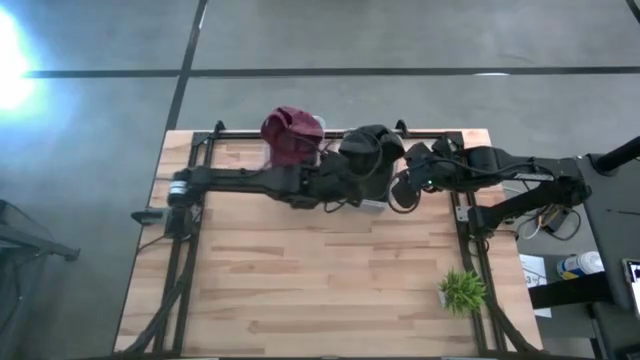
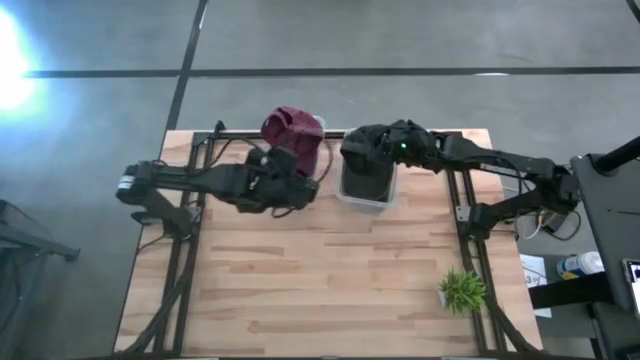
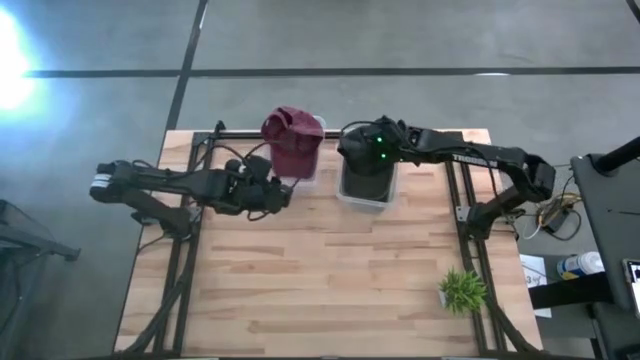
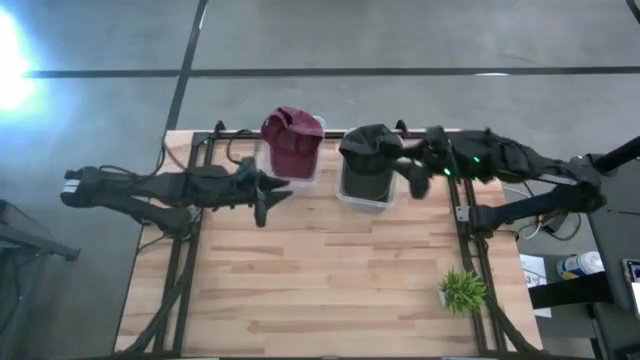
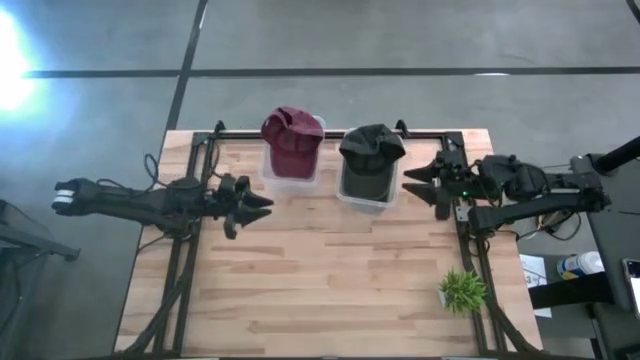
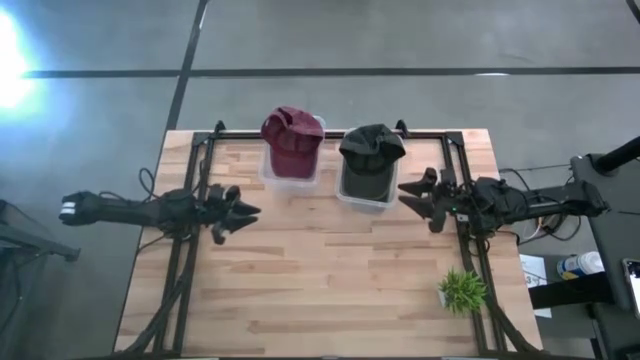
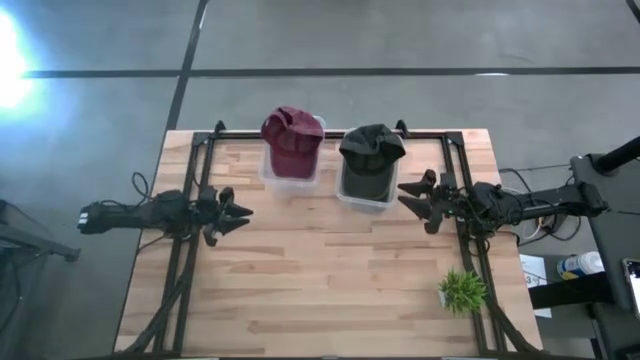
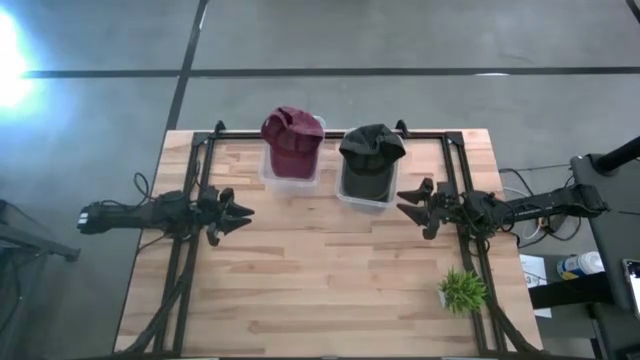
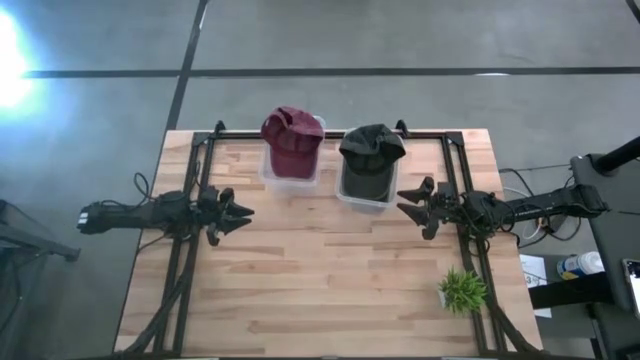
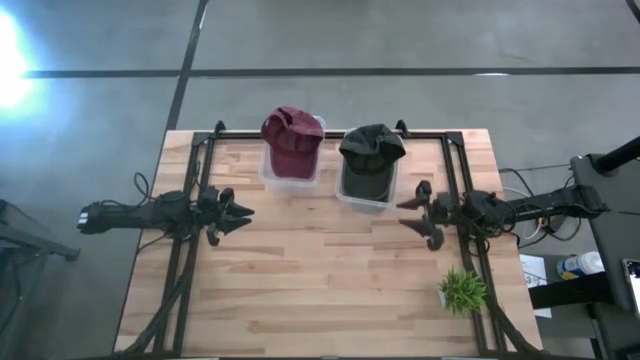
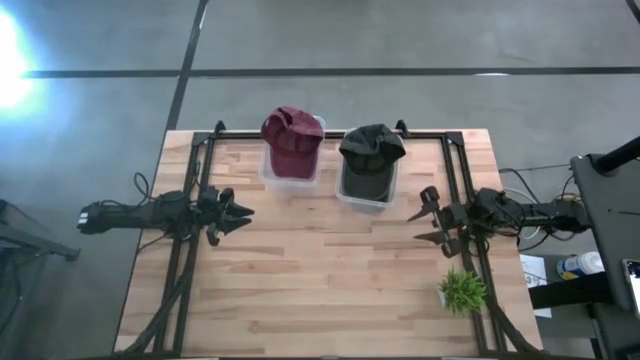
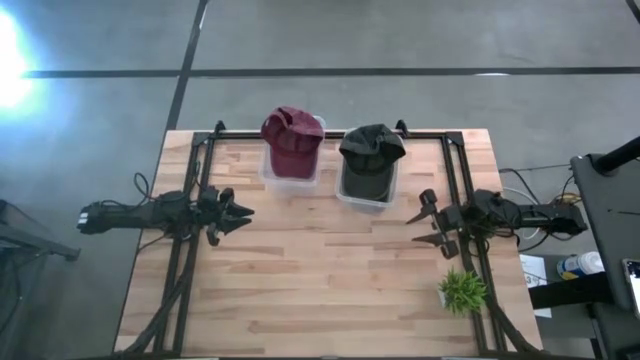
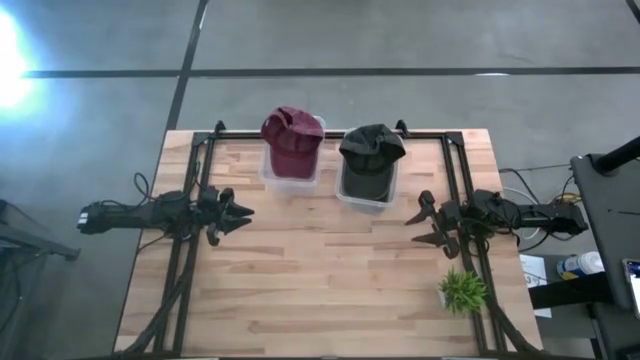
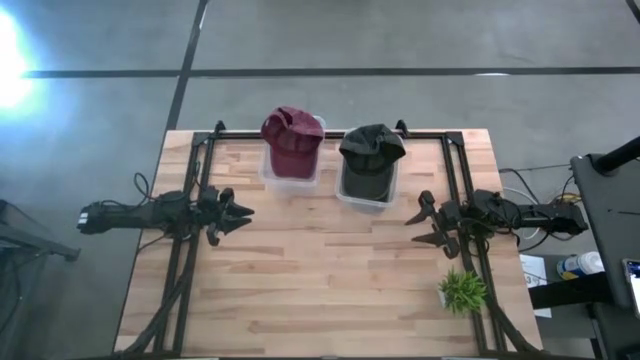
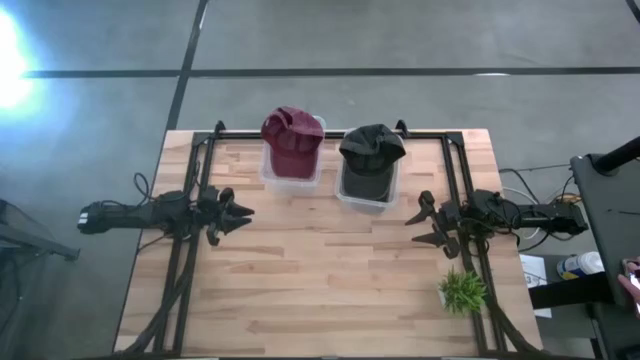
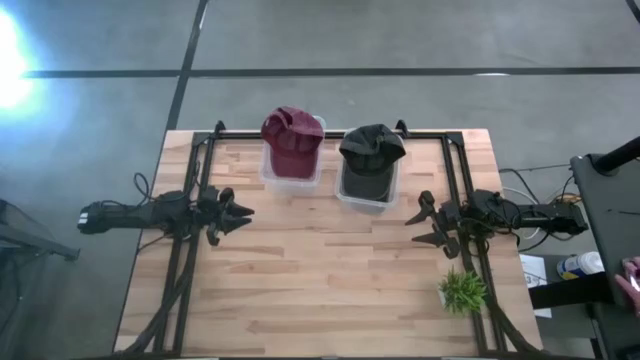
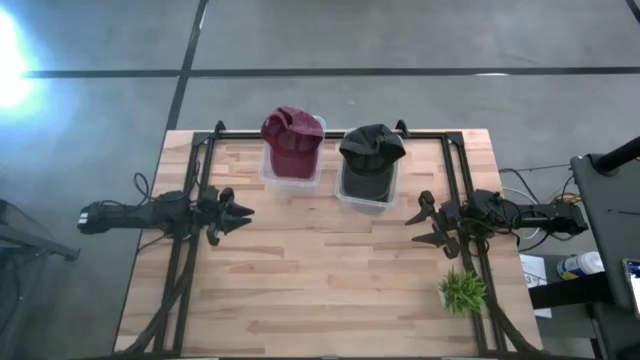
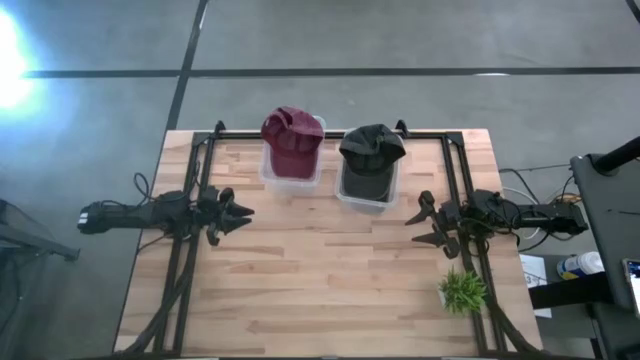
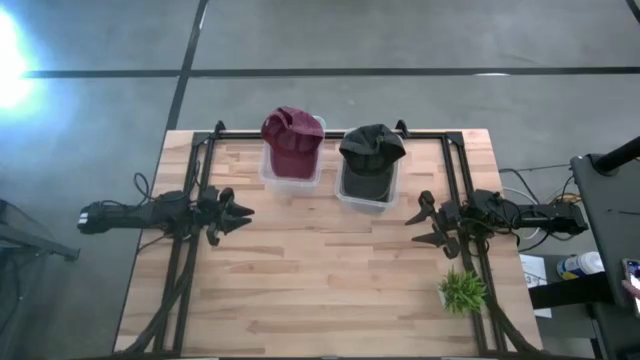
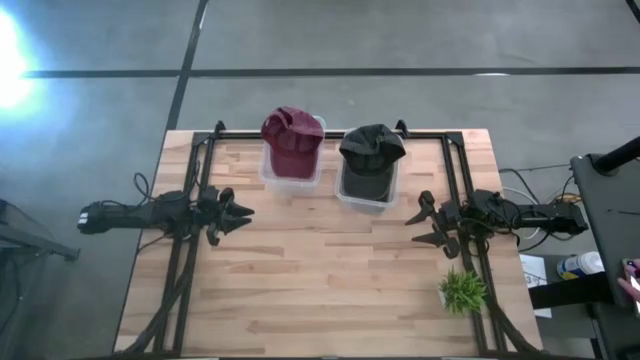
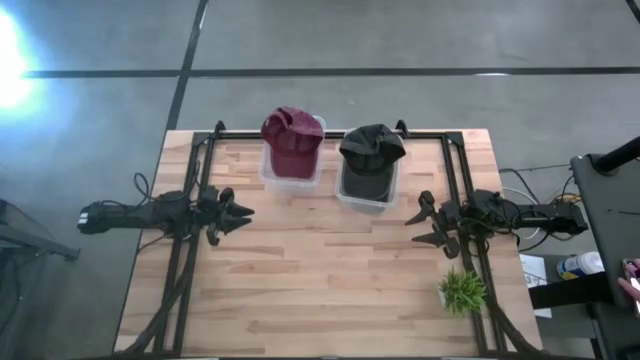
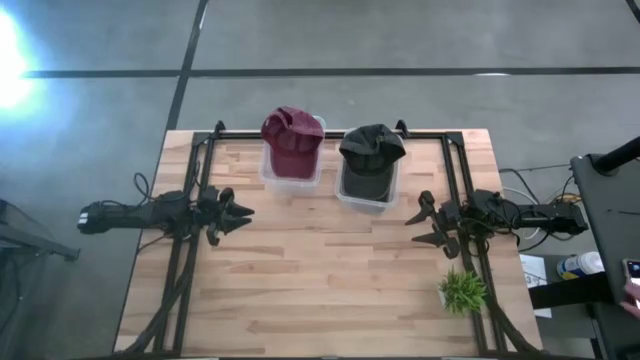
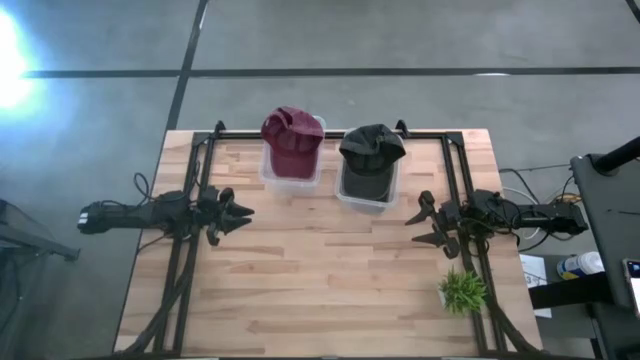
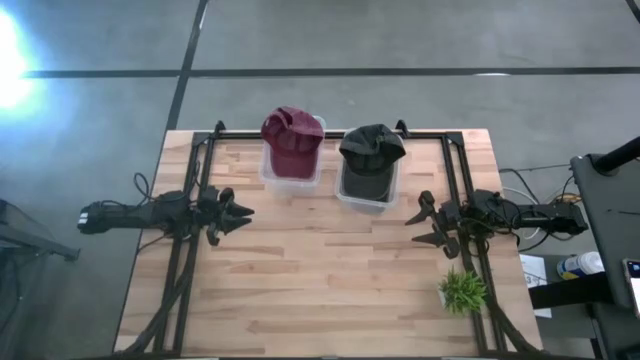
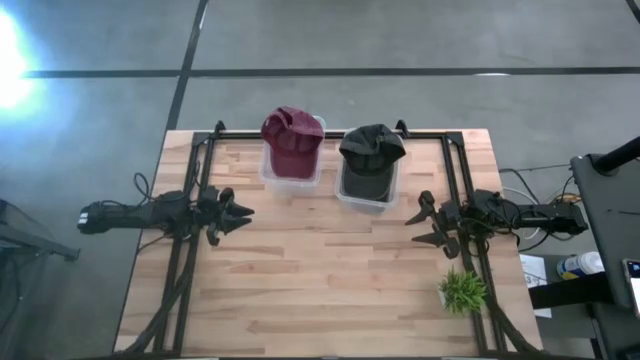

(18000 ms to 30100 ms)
Task: Pick & Place hat
Return to Home Position

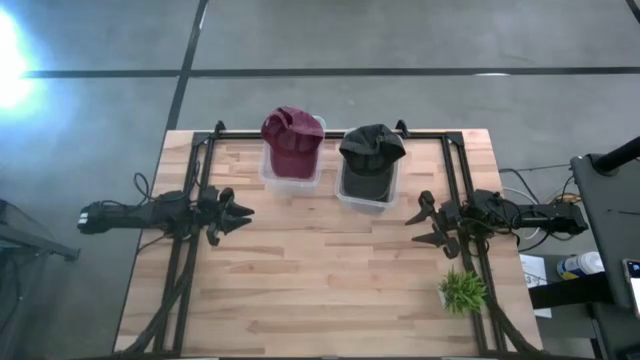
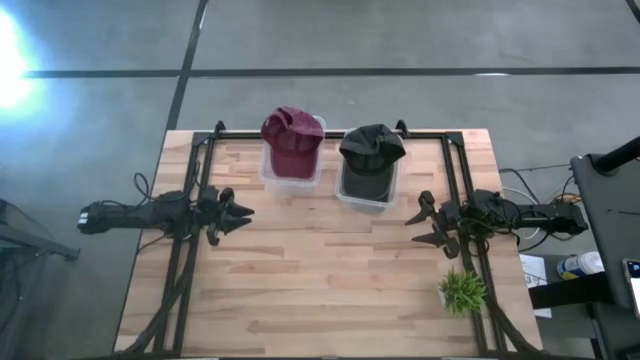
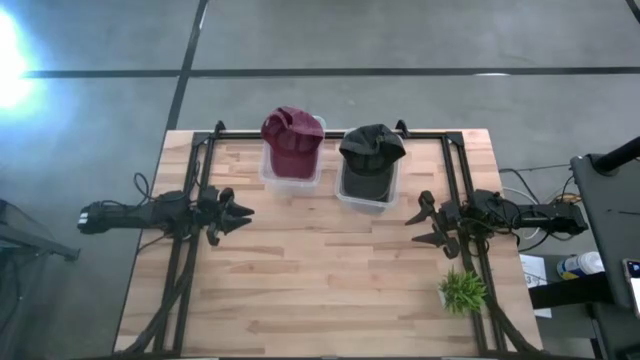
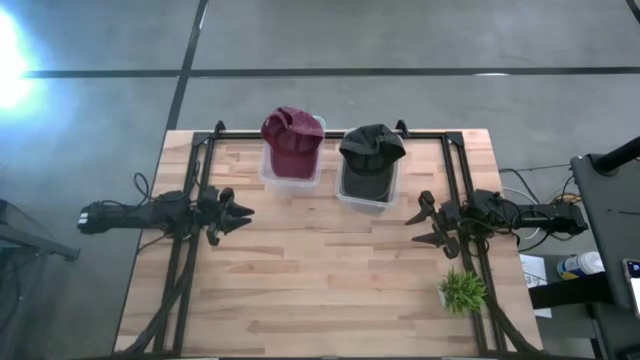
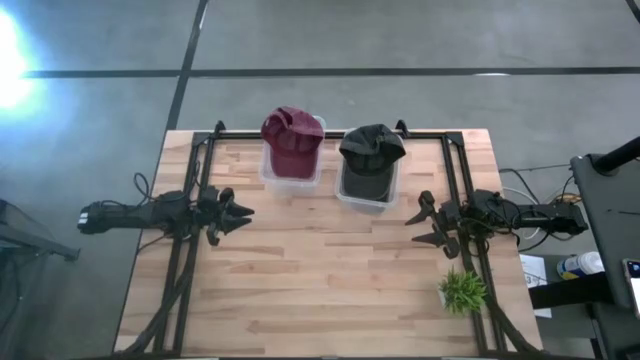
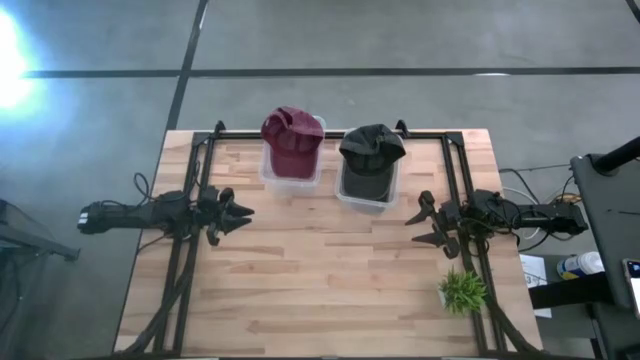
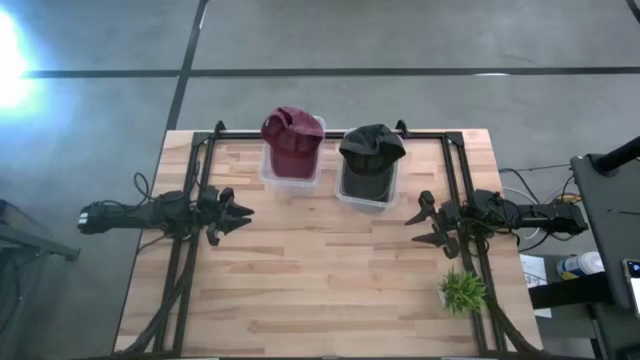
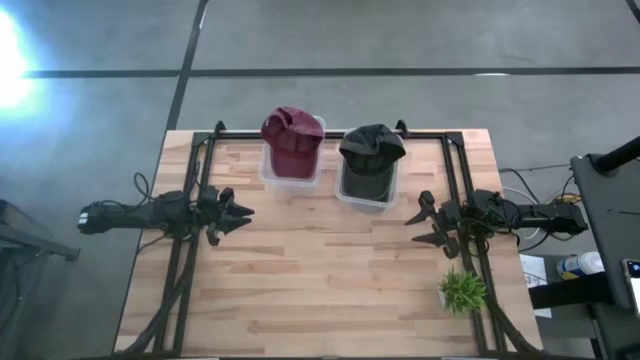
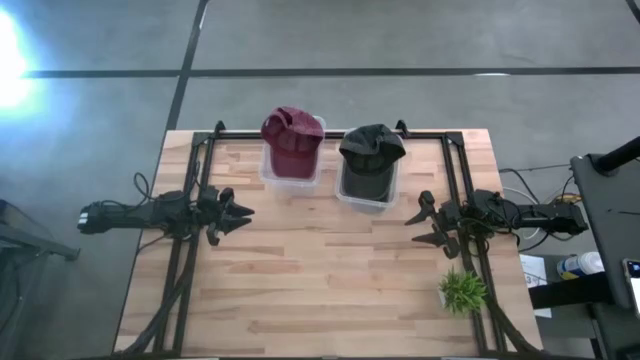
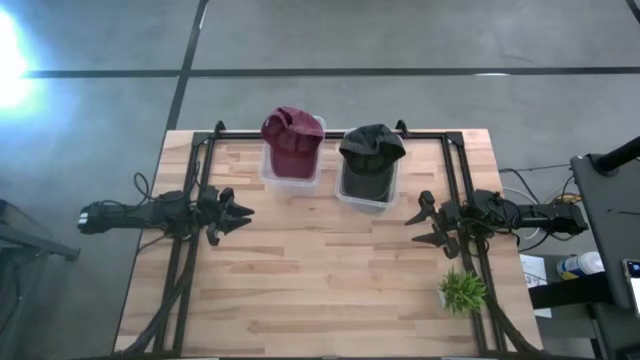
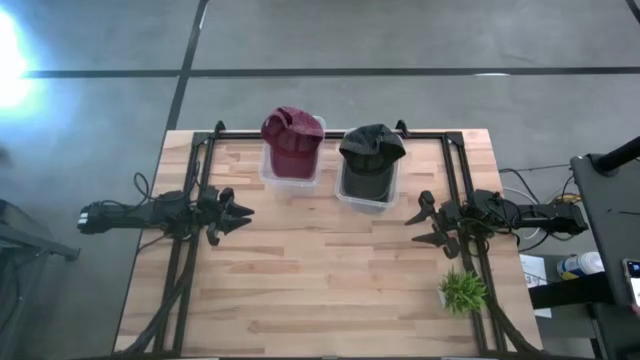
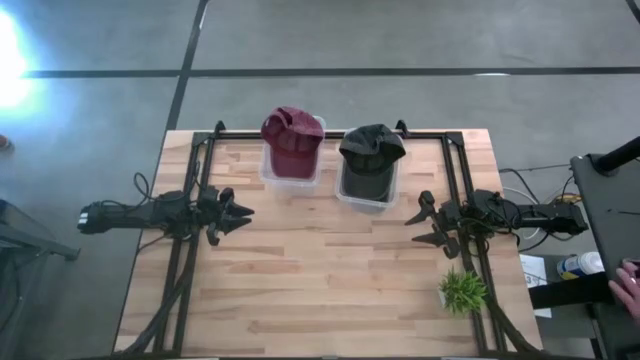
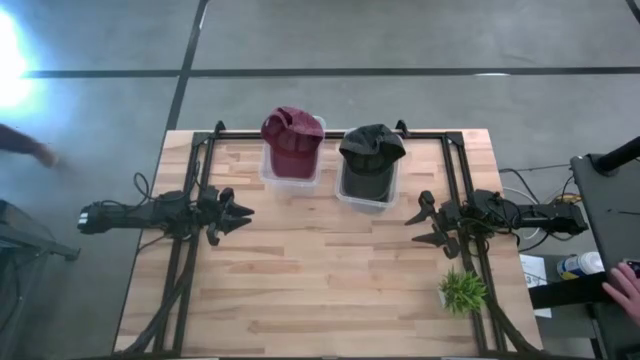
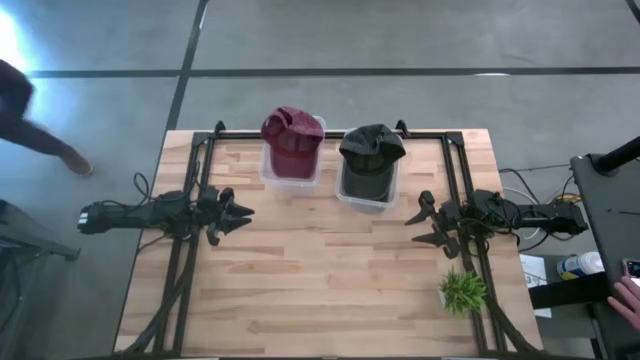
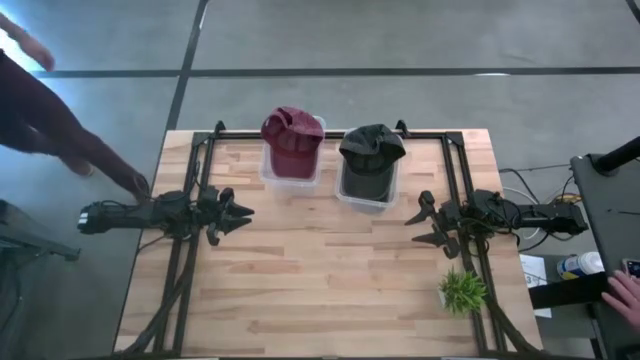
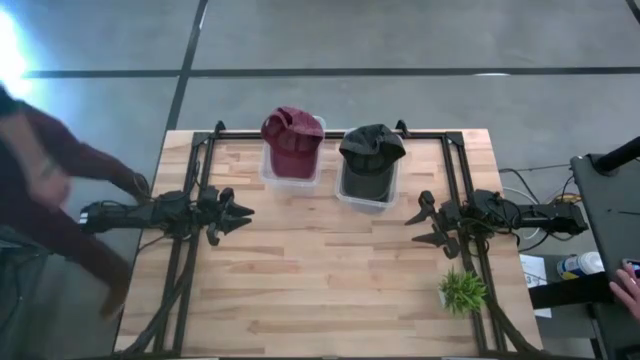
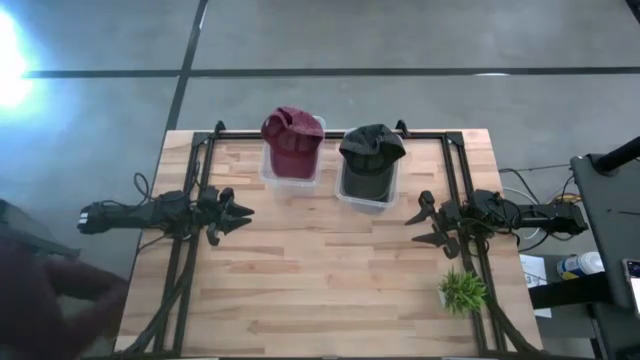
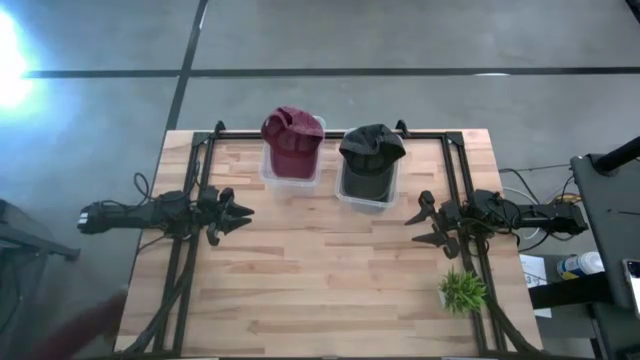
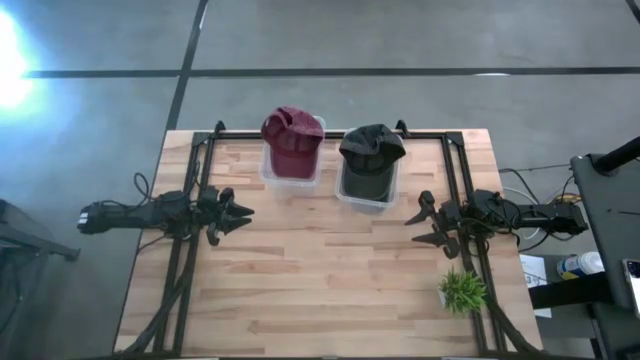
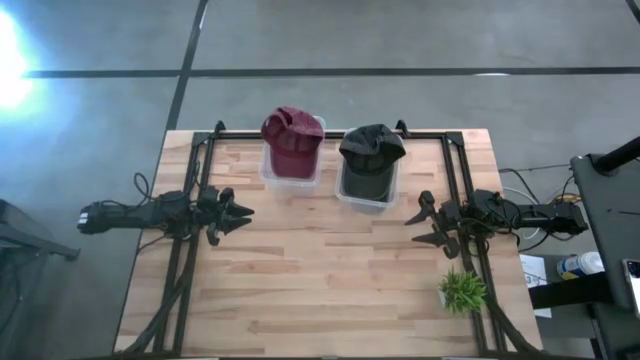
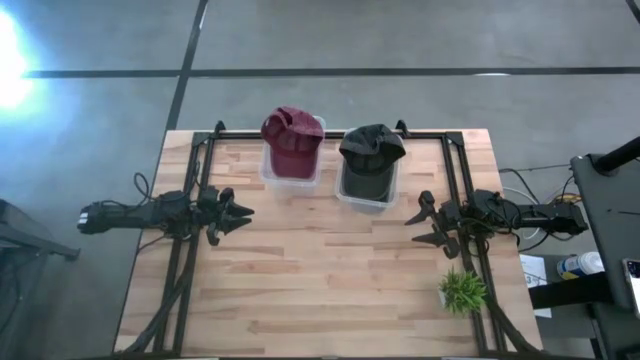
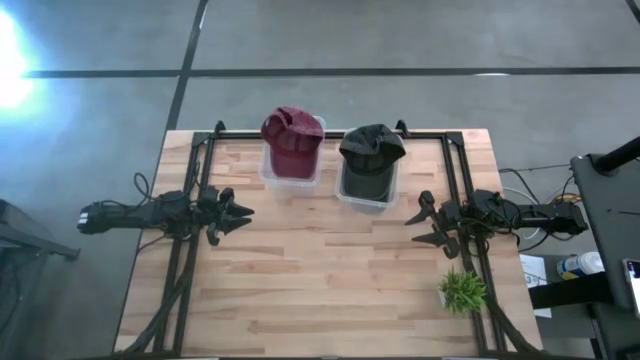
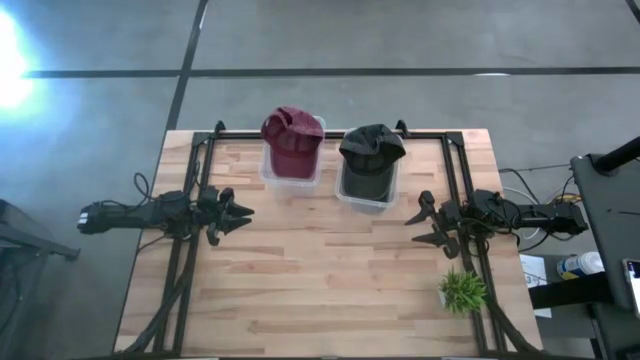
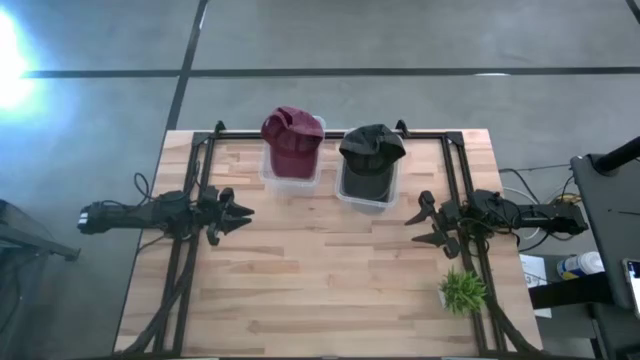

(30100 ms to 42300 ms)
Return to Home Position
